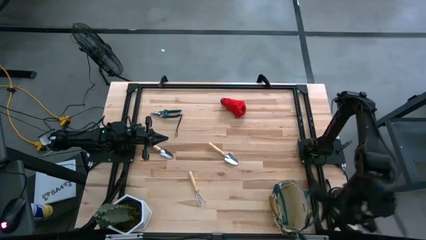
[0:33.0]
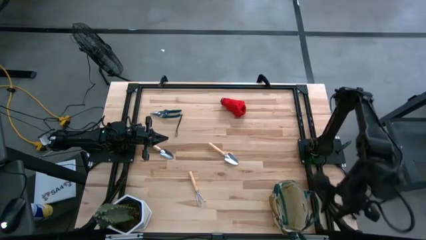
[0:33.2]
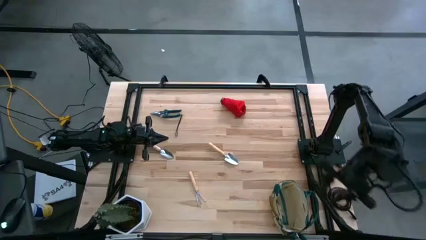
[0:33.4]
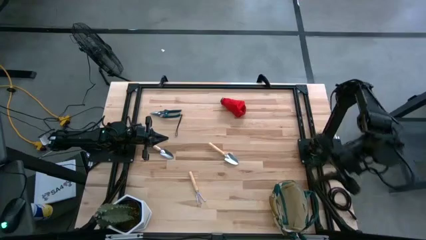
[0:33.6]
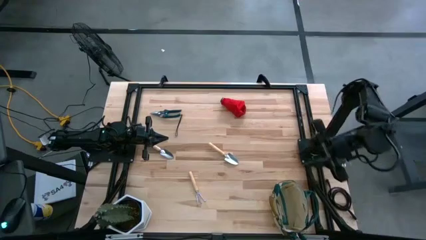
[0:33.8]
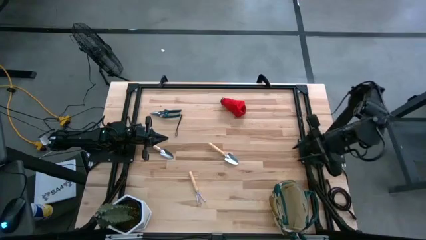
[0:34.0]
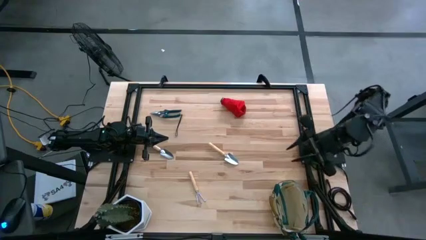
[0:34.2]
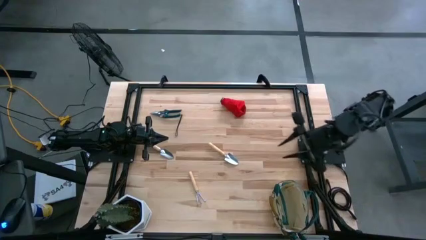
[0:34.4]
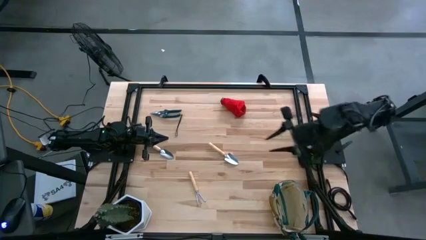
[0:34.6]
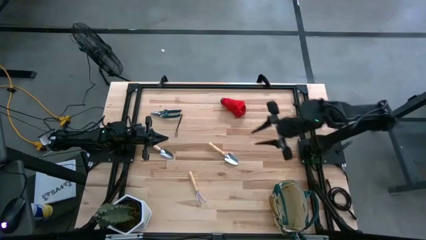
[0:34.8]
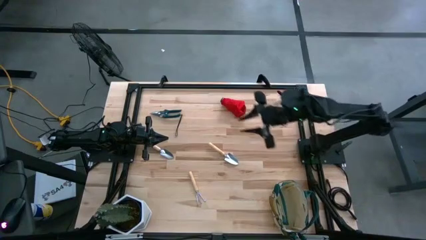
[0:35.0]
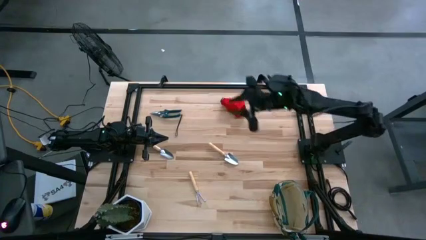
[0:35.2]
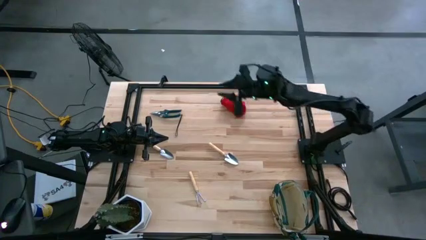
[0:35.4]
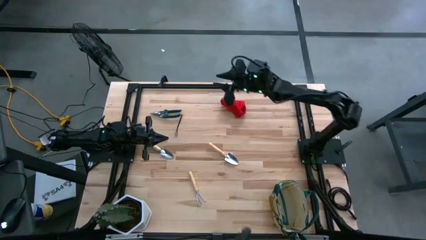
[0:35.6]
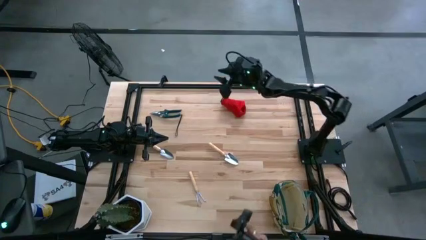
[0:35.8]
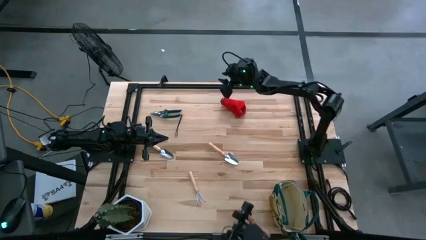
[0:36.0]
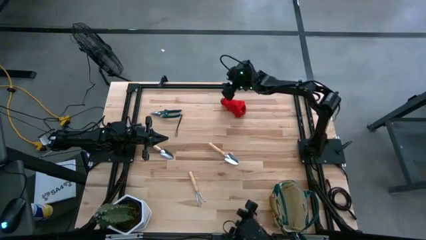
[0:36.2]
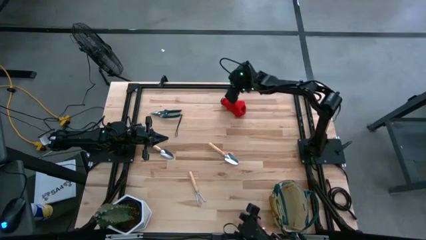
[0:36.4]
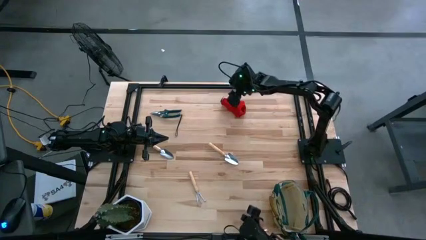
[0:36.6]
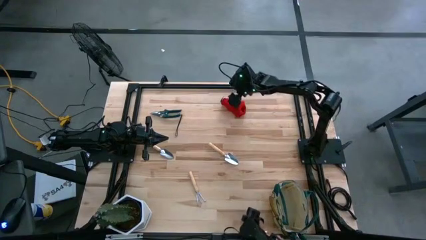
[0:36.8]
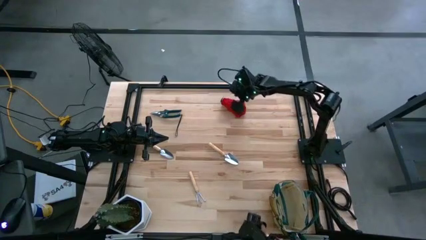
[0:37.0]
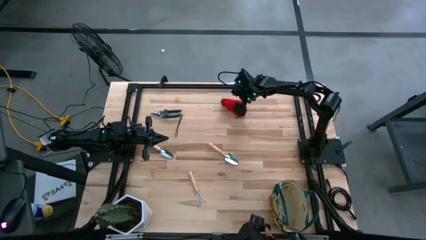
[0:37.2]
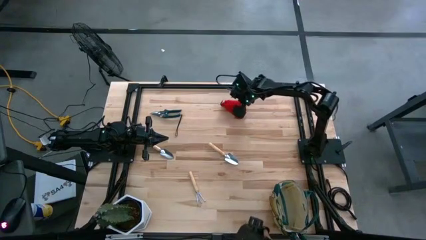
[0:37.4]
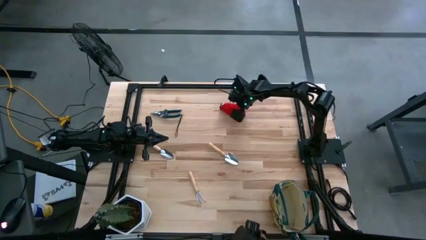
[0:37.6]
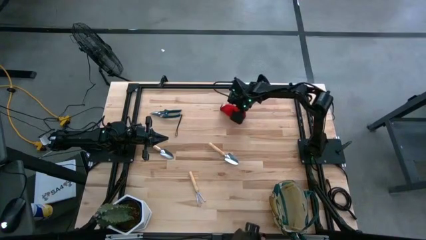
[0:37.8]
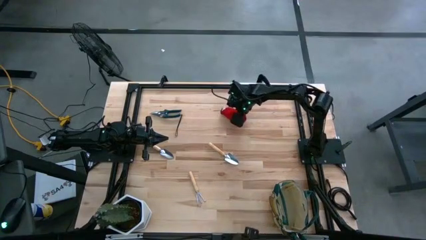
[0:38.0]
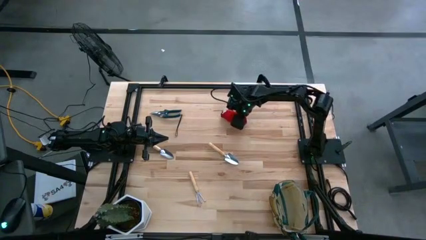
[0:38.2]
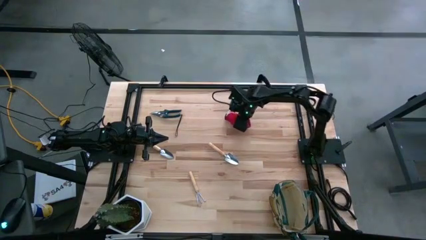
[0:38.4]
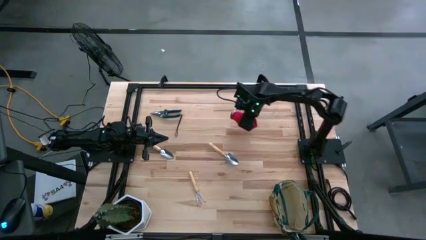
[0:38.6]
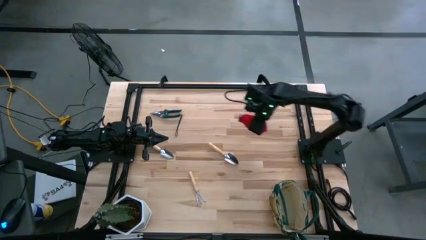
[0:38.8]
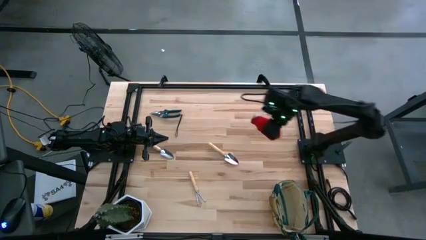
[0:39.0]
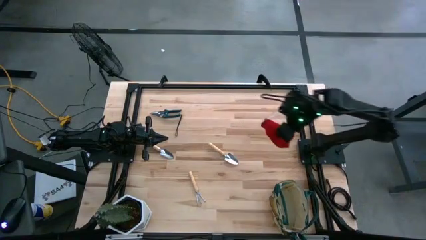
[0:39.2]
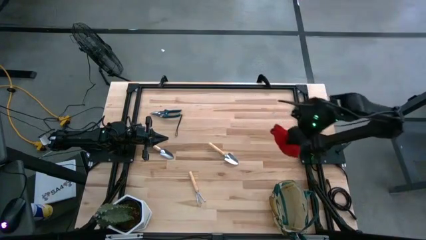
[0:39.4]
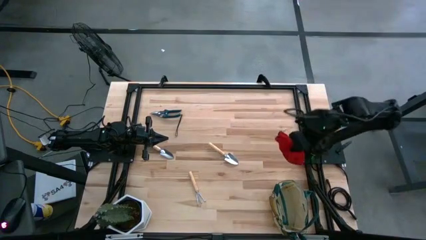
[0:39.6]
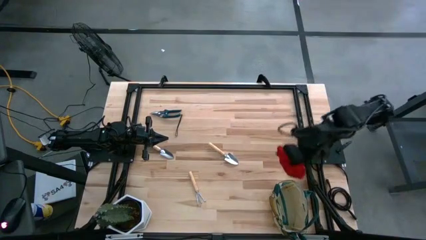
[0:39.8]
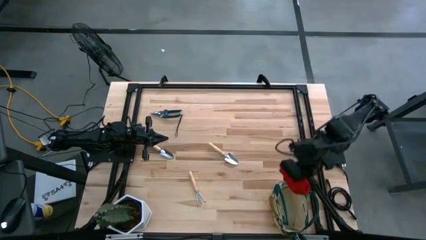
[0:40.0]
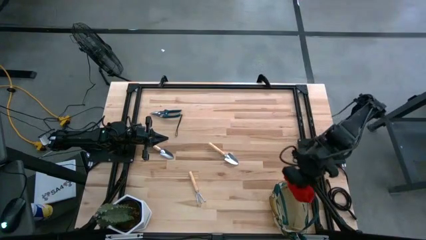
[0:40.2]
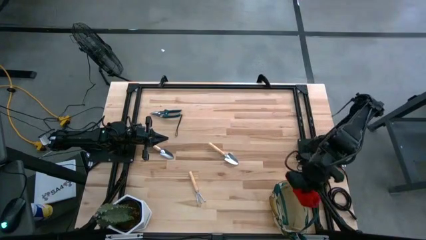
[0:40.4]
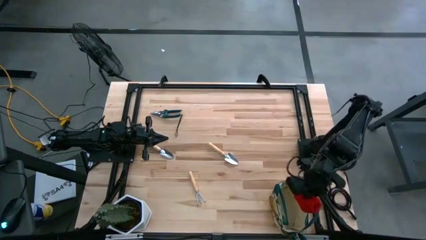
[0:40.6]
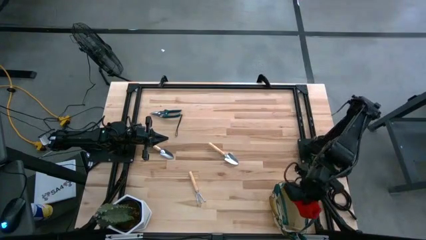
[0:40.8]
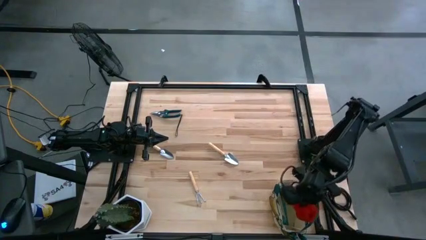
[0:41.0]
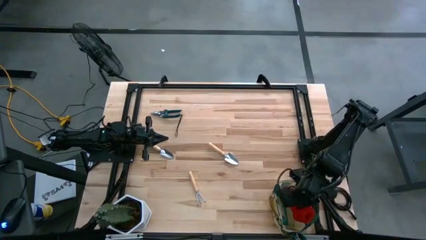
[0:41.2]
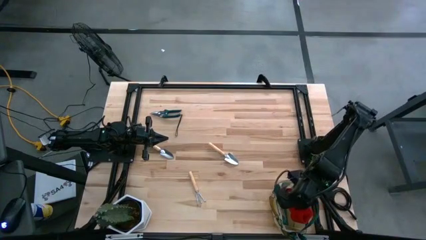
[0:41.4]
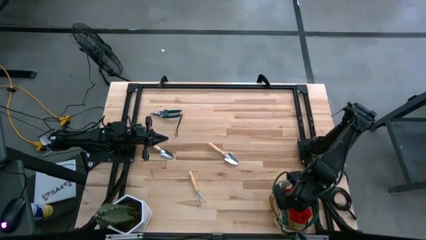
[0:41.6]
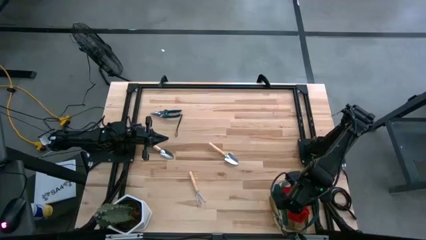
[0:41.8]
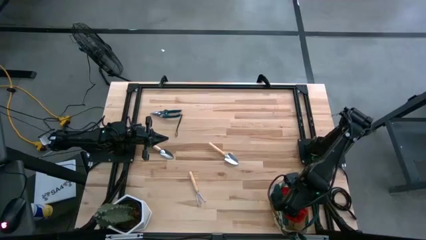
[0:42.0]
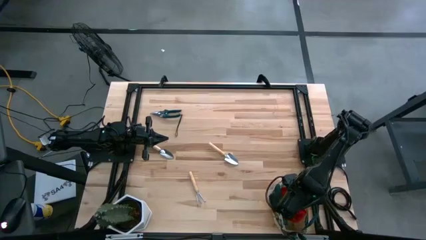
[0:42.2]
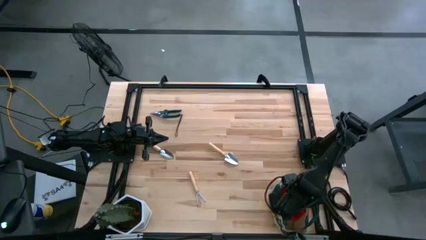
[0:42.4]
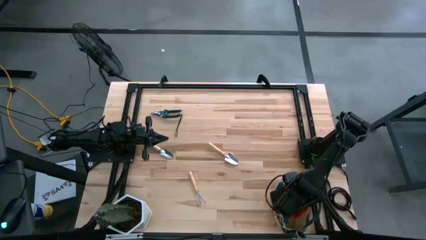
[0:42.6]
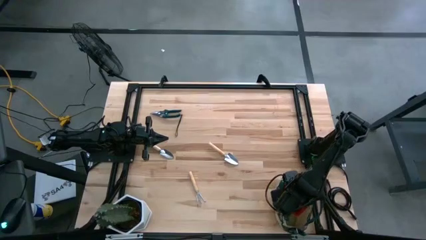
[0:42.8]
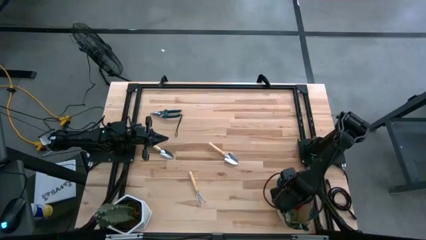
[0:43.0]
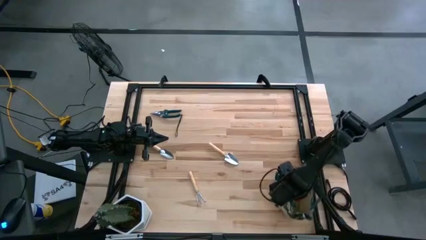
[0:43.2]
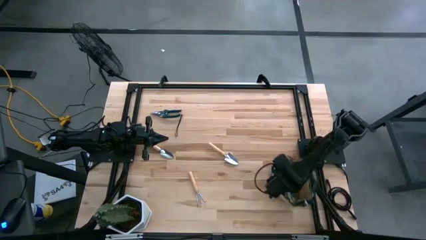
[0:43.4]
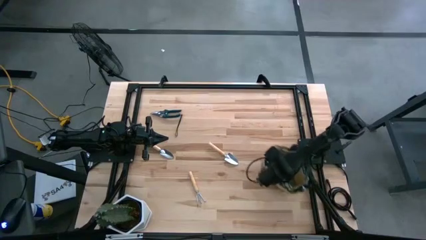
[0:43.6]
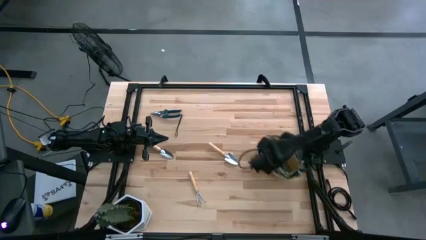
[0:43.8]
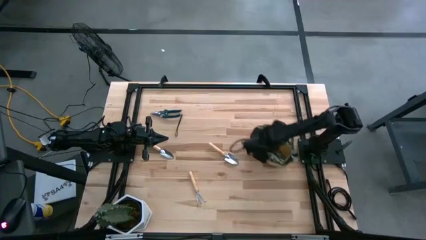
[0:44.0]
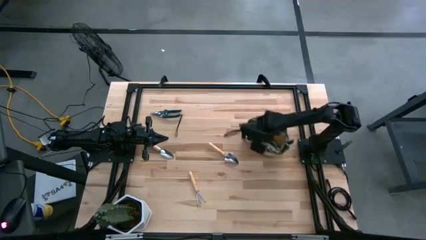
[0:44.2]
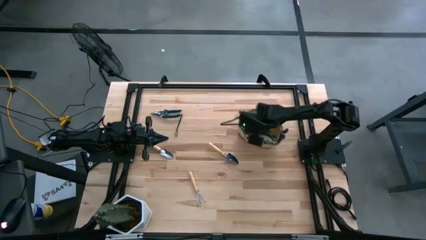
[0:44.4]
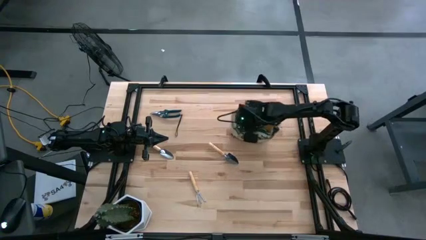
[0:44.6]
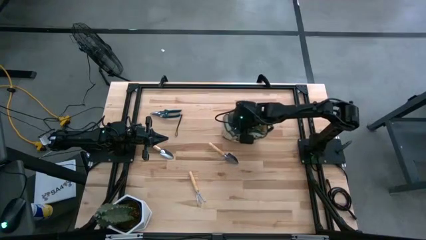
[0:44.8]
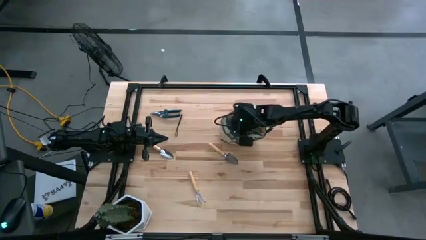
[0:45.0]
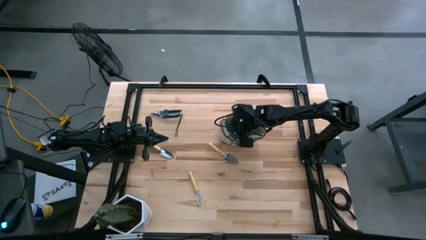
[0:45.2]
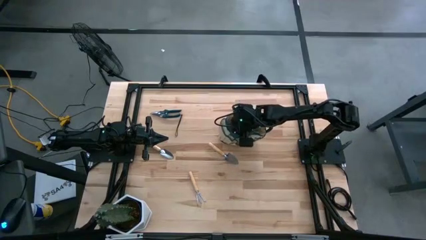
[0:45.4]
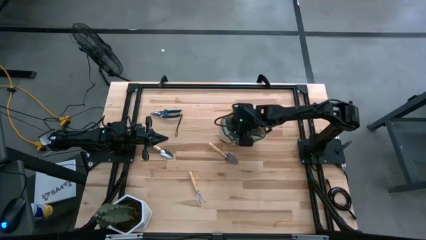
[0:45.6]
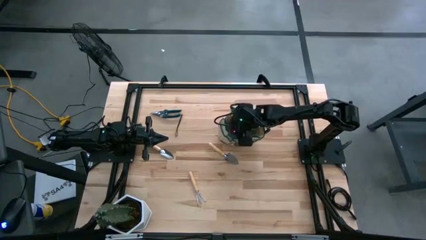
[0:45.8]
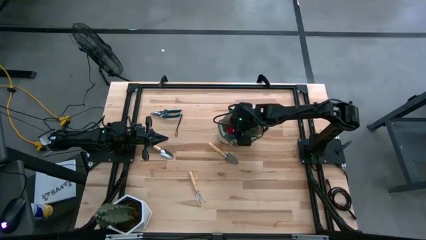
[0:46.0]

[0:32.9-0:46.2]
Task: Pick & Place Garden tools in Gardening bag
Put the red gloves into the gardening bag

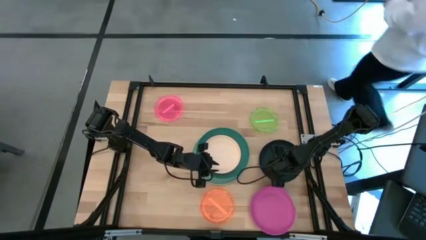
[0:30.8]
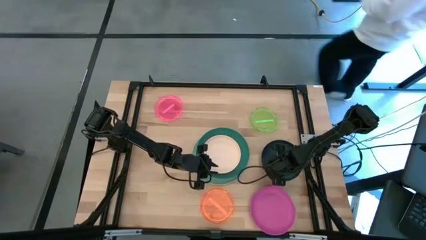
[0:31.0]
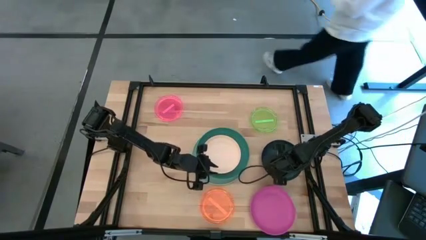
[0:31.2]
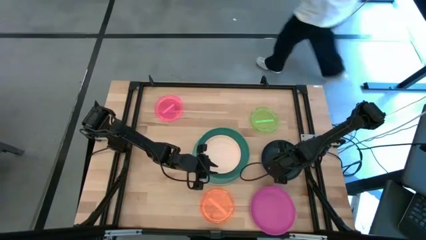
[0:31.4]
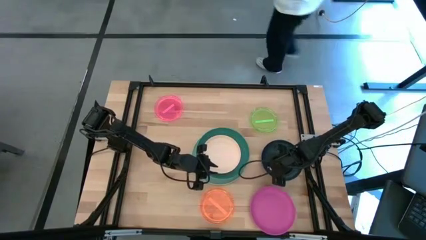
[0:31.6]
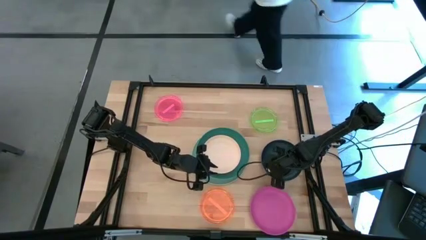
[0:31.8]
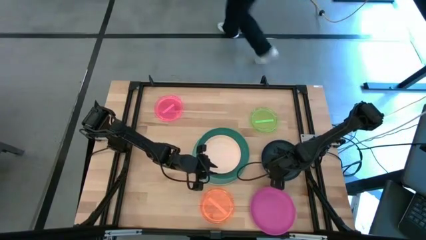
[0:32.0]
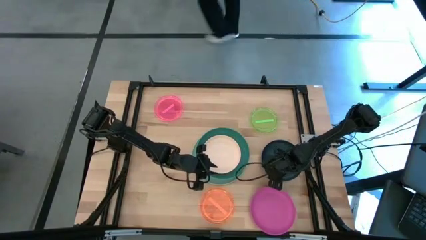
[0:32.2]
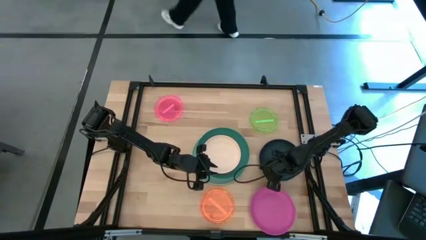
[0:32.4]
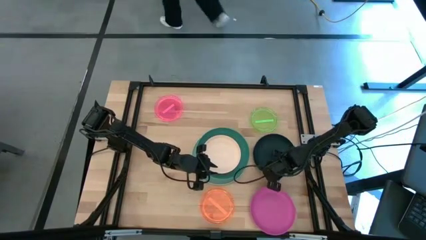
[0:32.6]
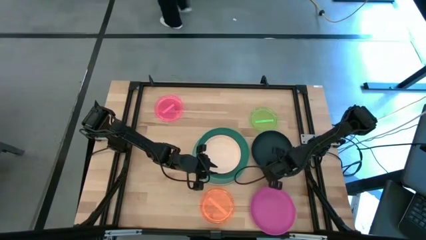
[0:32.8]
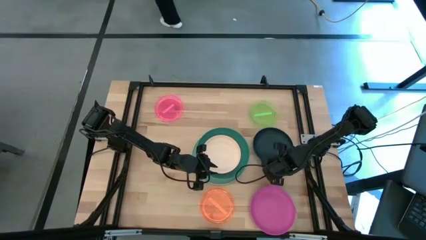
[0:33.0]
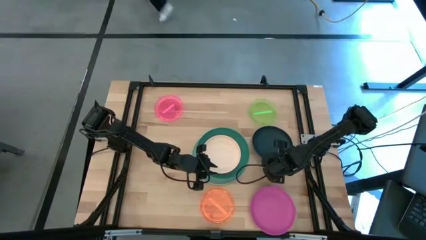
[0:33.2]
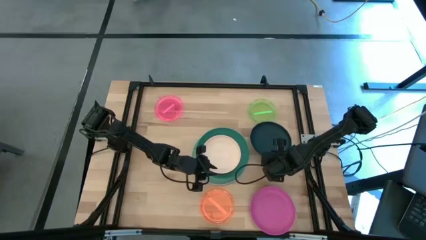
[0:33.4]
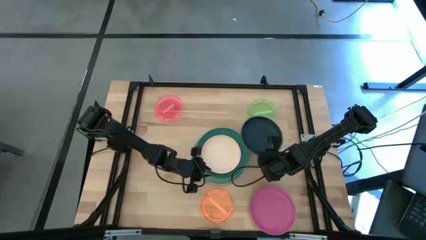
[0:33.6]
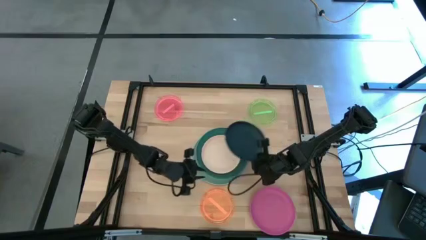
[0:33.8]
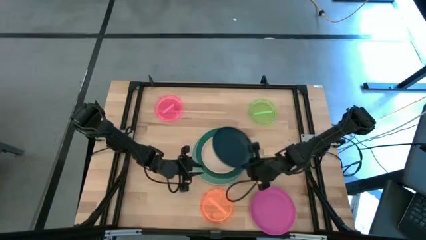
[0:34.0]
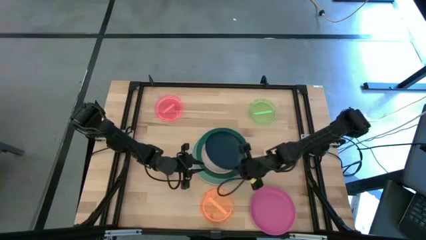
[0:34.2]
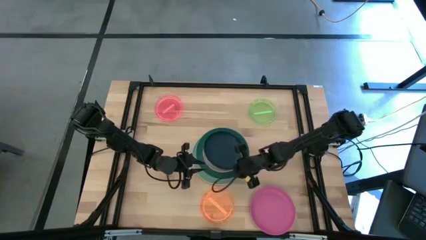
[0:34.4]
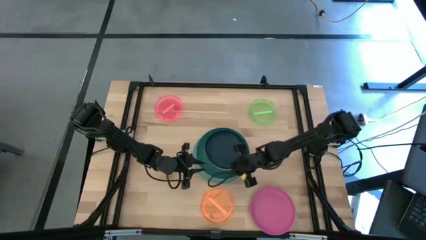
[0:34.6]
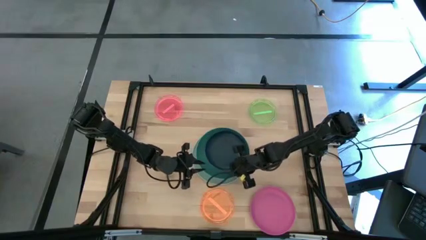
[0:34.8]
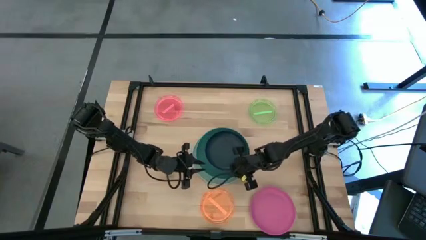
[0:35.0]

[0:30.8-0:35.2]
Task: Stack plastic plates
Stack the black plate on top of the white plate
